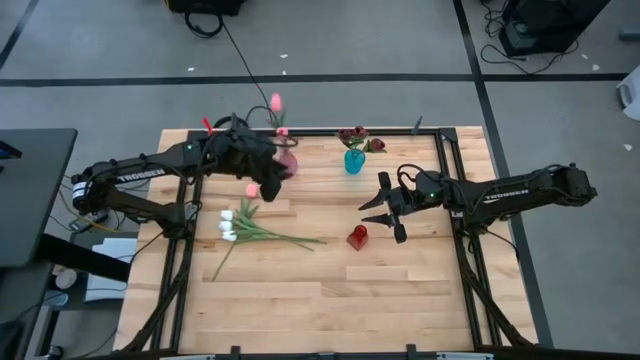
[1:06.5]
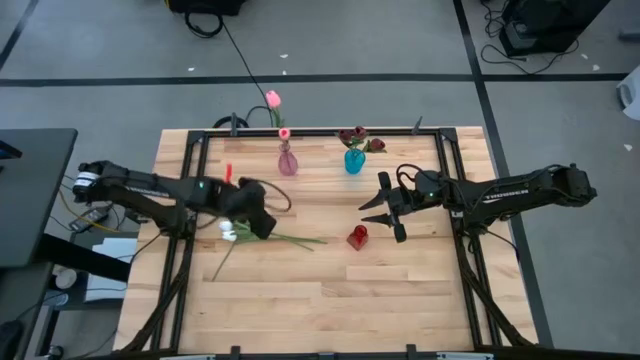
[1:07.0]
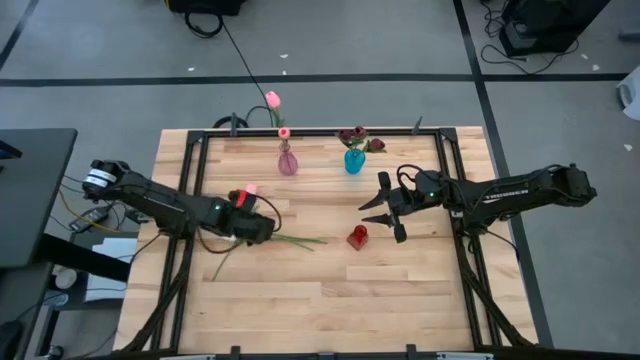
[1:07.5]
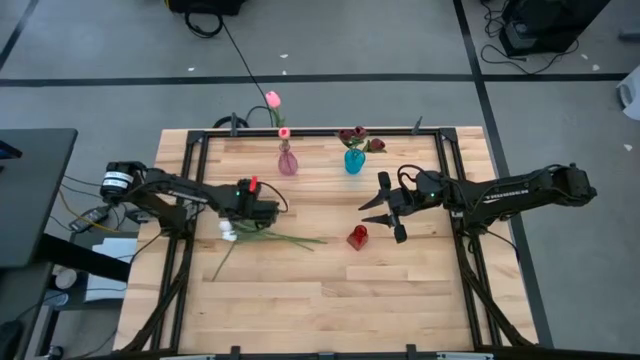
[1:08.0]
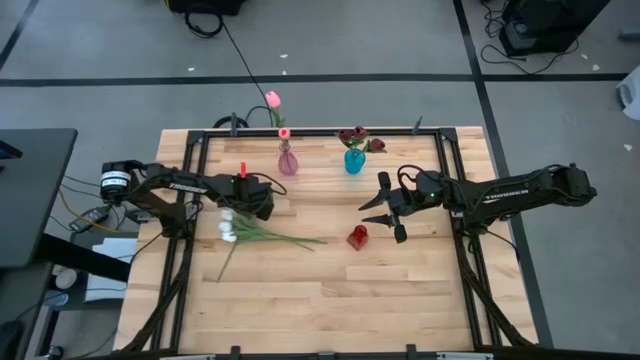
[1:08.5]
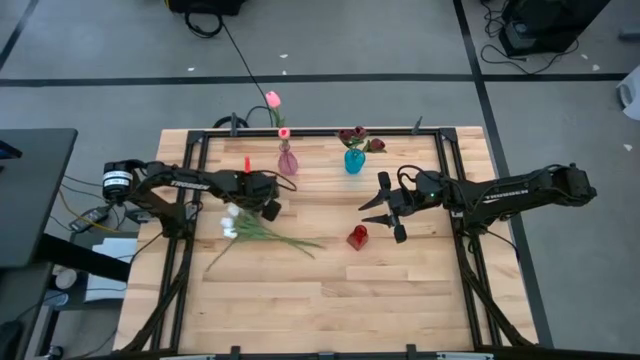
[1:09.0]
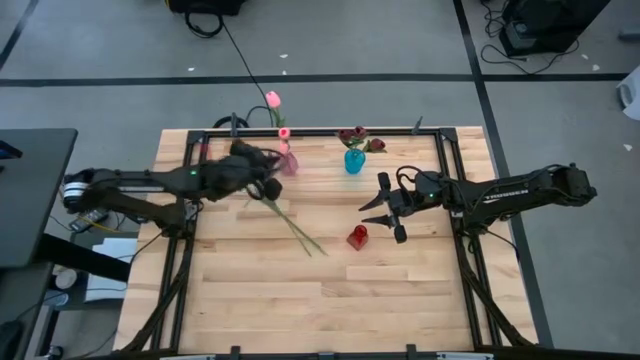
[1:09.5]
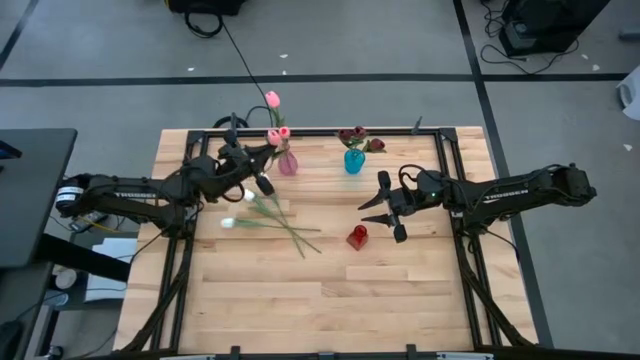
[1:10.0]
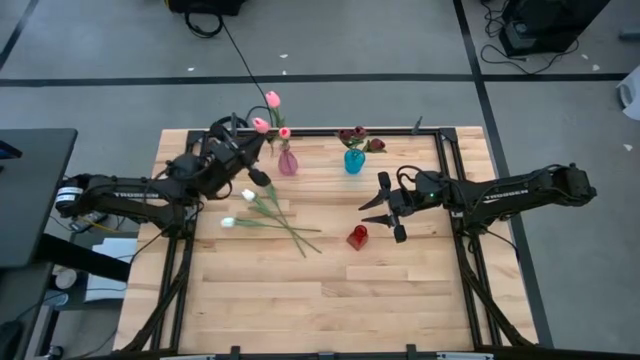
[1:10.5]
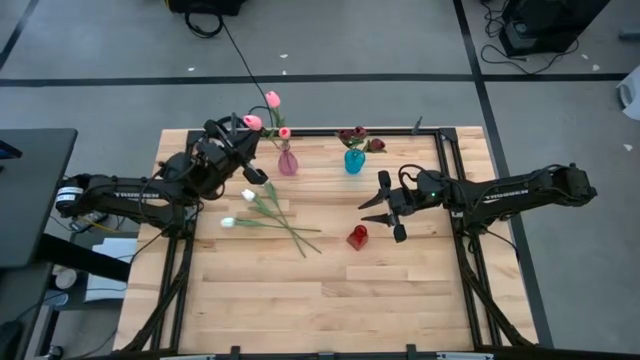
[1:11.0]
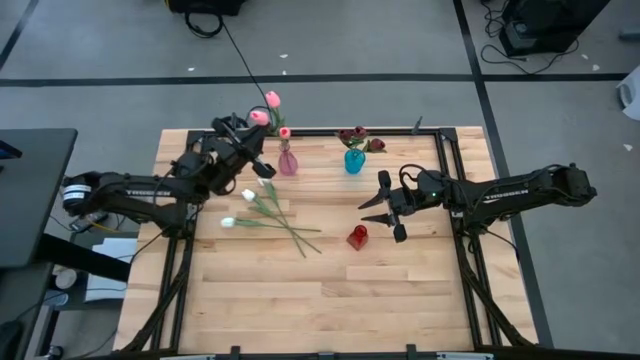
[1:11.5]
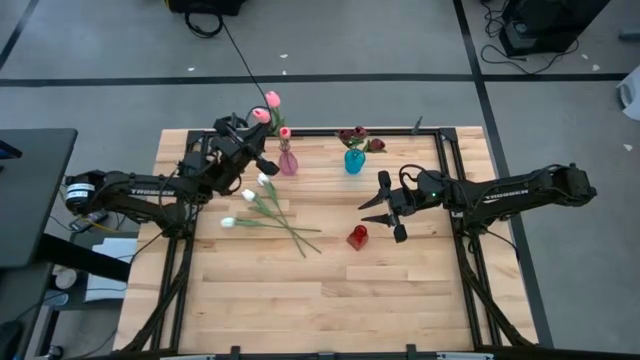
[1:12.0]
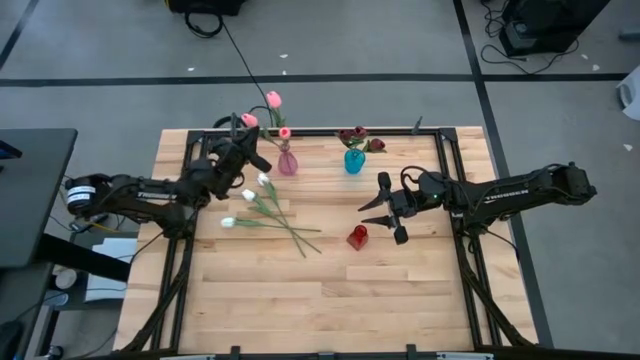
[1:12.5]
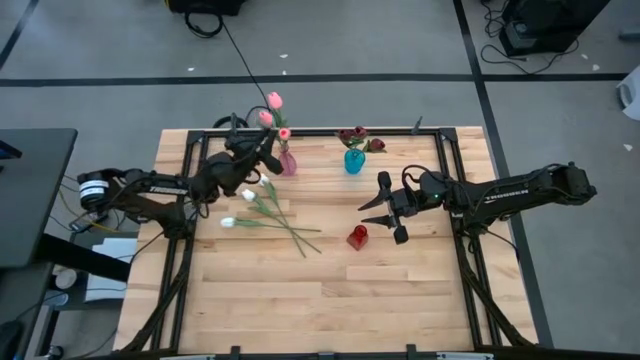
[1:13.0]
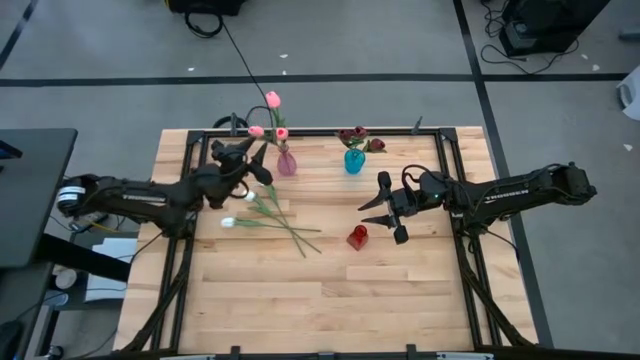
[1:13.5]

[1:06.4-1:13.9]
Task: Sort flowers into vase by color
Put the pink tulip into the purple vase

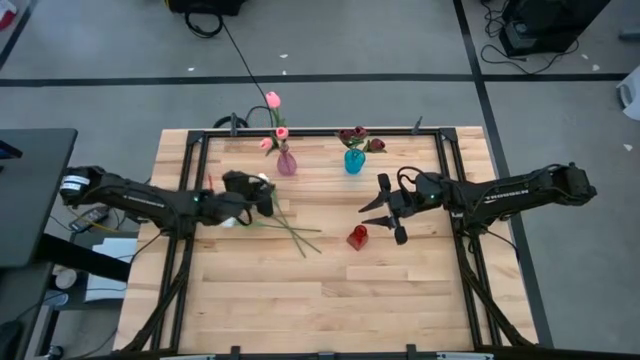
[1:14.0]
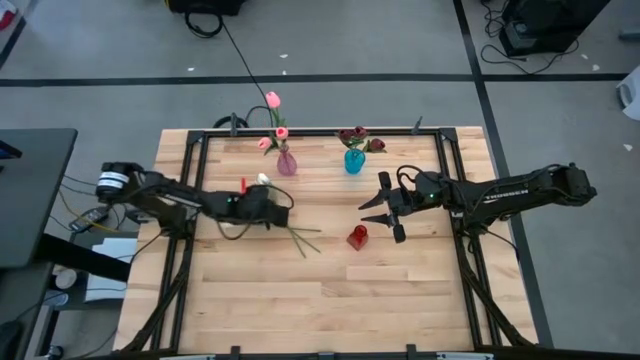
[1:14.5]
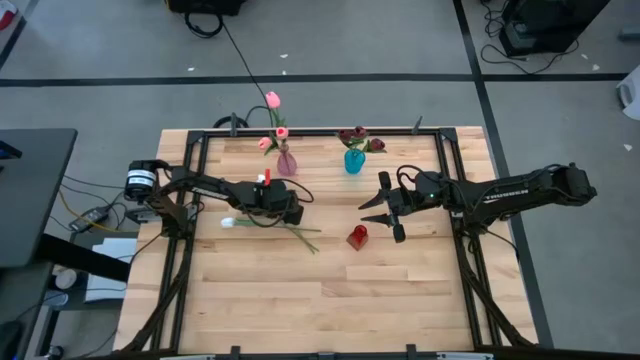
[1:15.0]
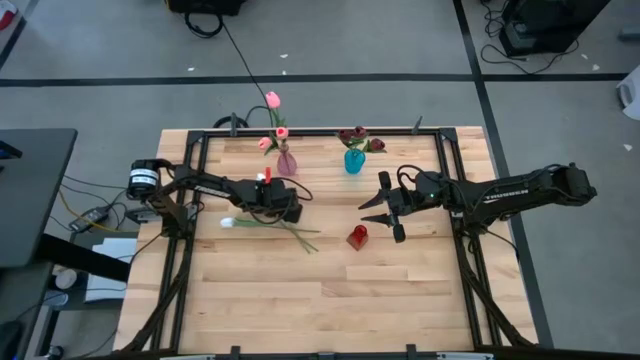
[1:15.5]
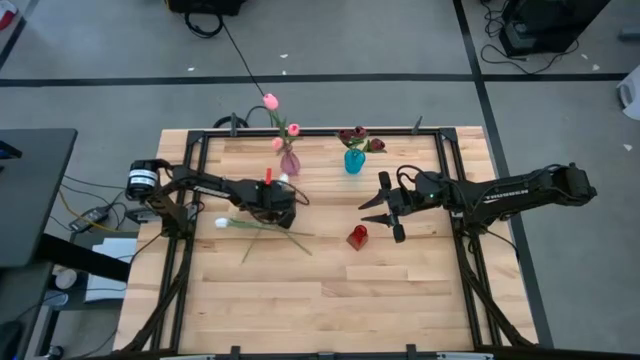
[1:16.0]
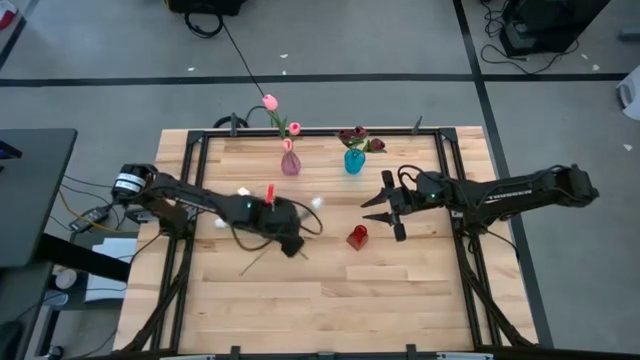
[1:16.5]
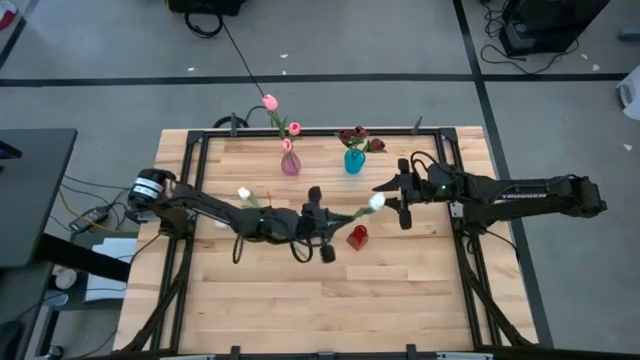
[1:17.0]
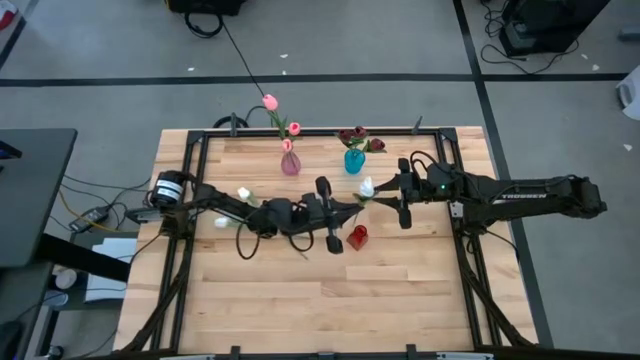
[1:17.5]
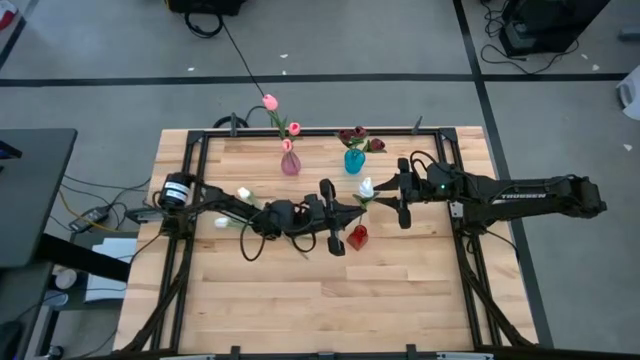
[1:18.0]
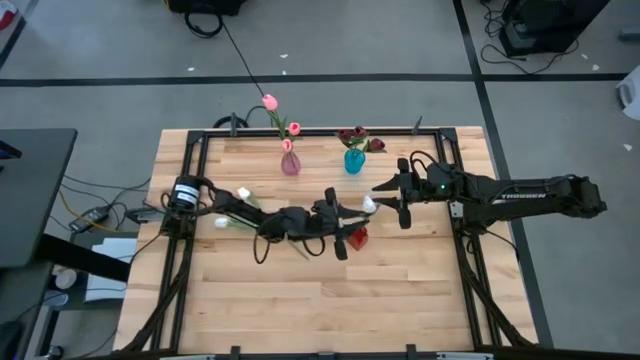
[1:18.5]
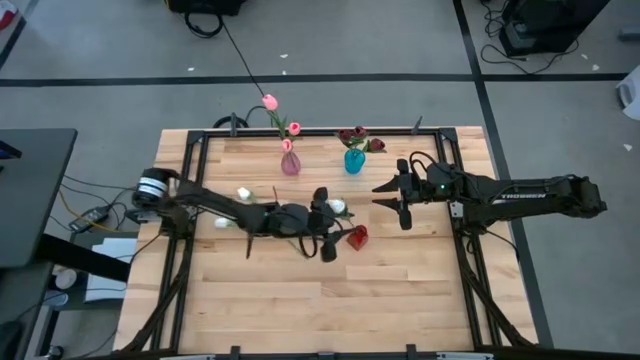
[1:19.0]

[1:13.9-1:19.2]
Put the top white tulip into the red vase

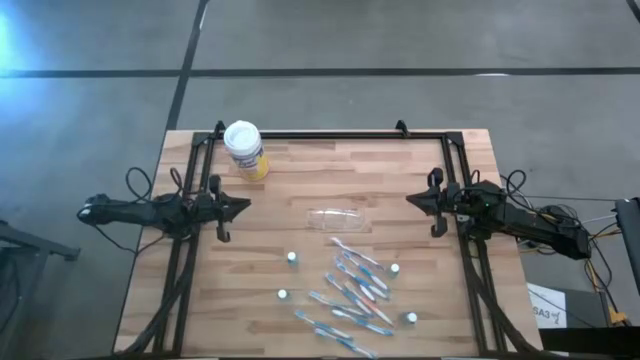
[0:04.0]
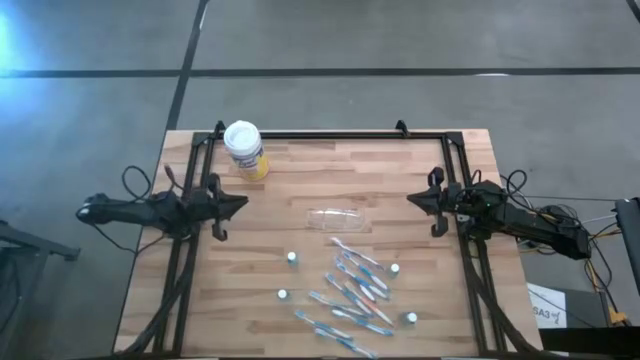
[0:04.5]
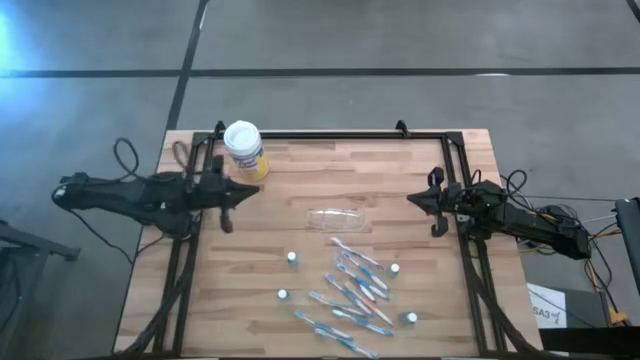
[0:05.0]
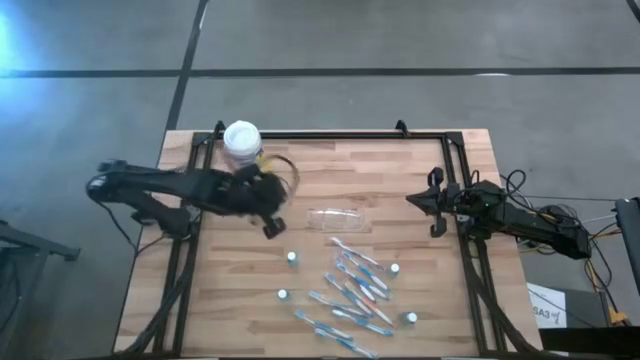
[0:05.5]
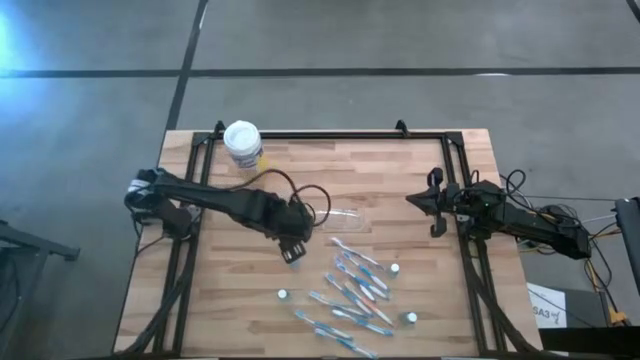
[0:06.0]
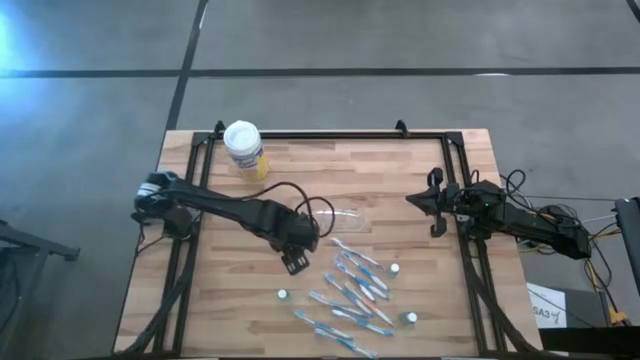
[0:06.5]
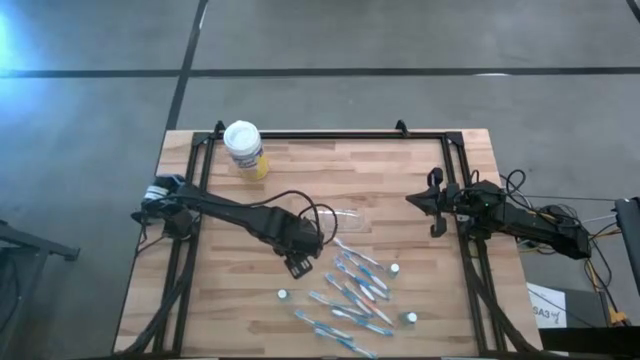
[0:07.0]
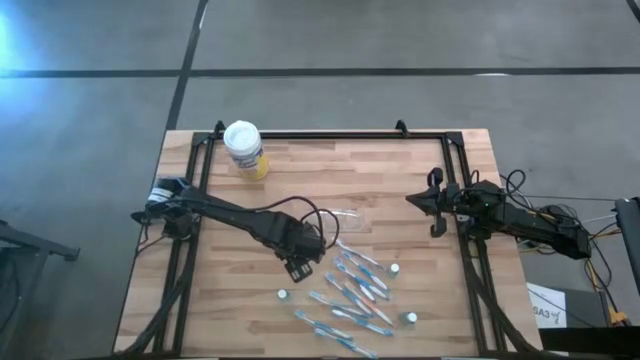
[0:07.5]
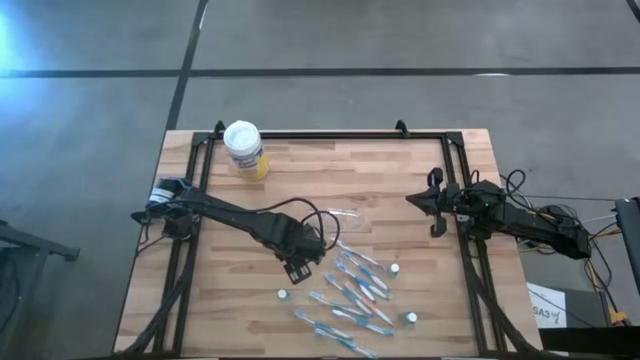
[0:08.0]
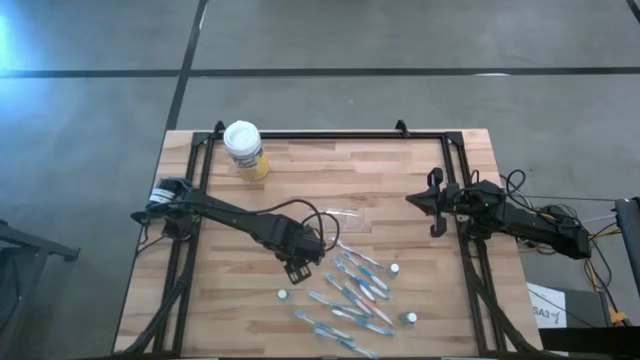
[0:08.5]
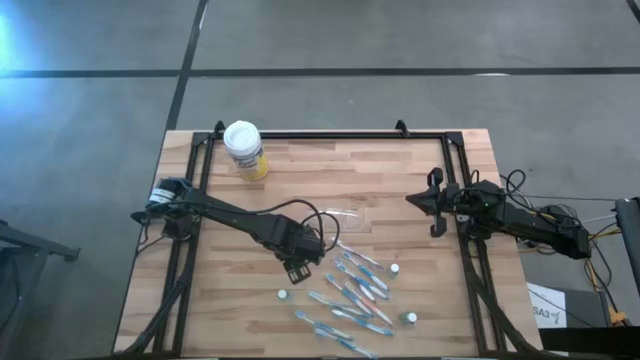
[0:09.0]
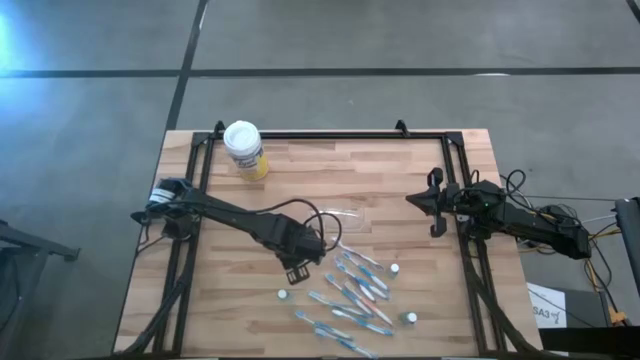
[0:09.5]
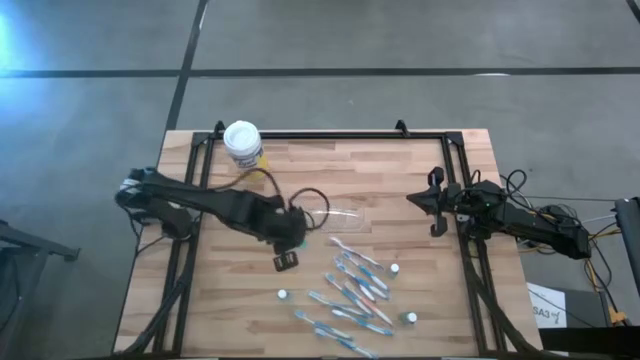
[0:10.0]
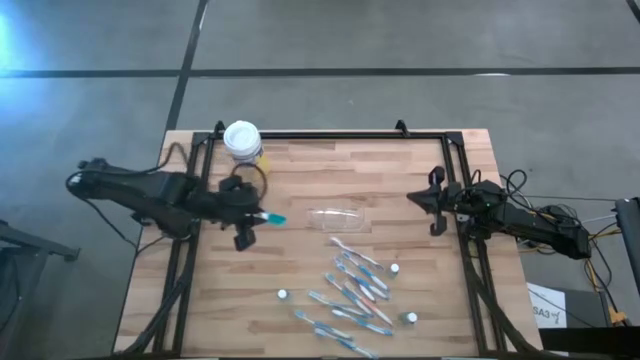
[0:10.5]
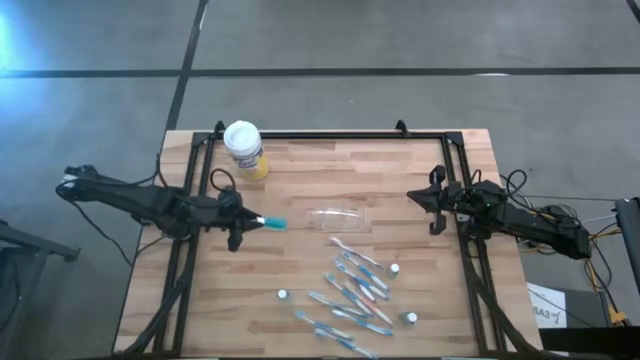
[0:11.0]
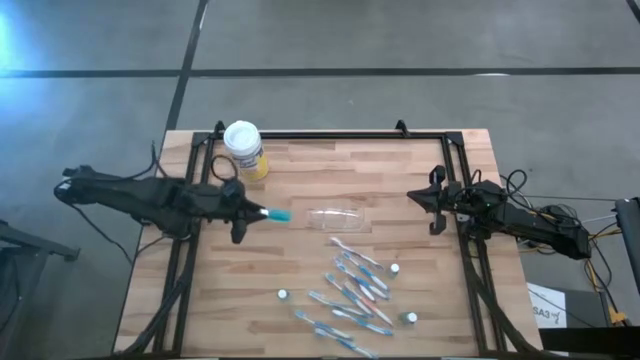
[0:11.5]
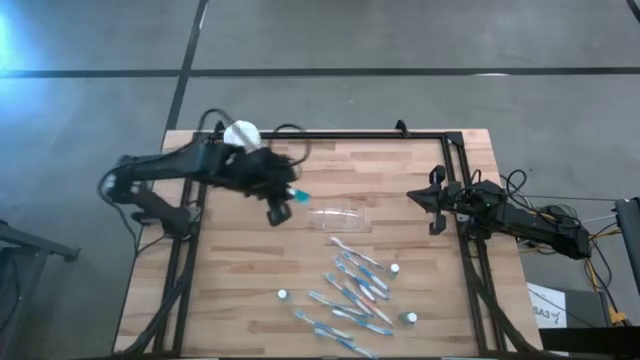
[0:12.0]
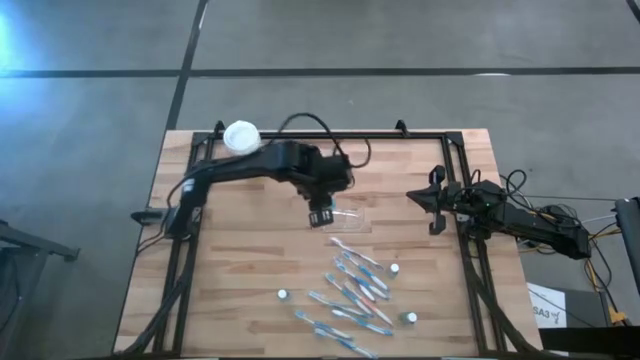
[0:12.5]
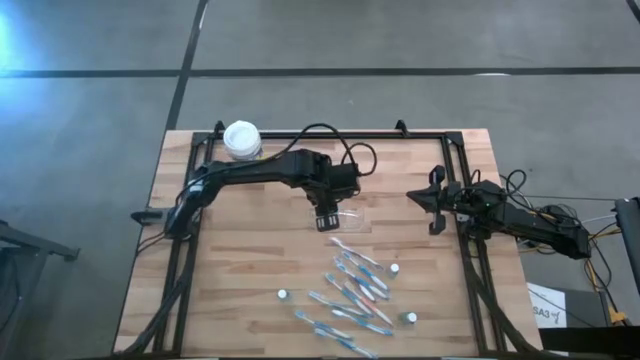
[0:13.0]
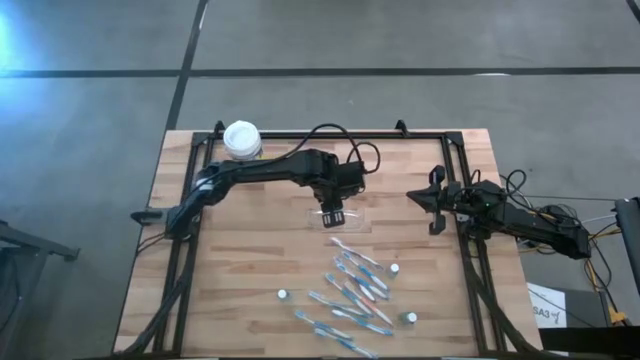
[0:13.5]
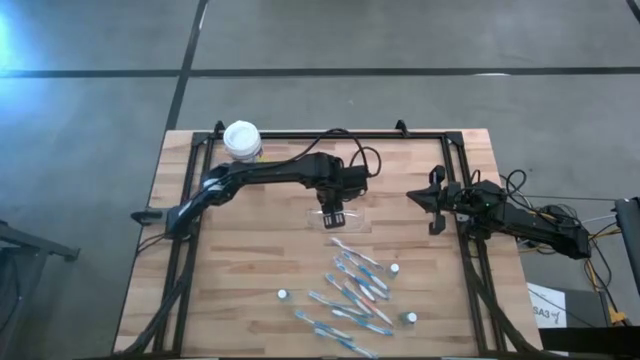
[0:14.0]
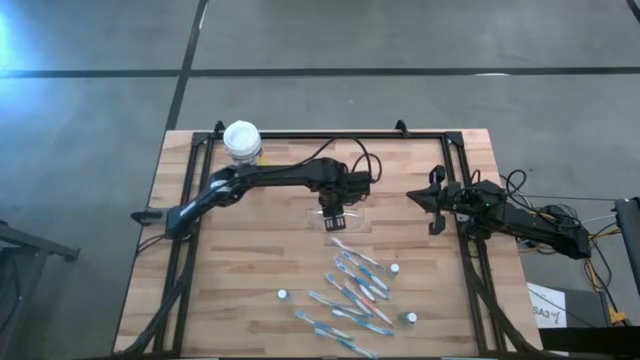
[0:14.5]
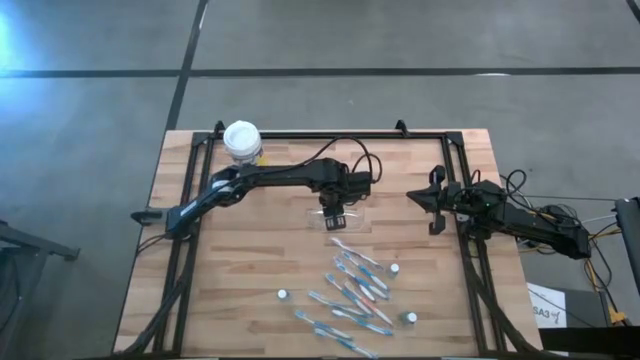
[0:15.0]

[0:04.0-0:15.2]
Task: Pick & Place toothbrushing station
Put the blue mouthwash bottle into the middle compartment of the transparent organizer
